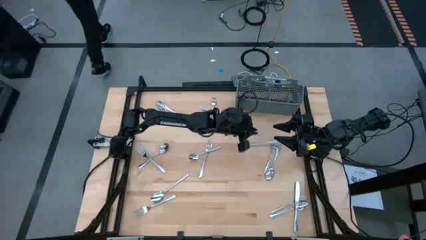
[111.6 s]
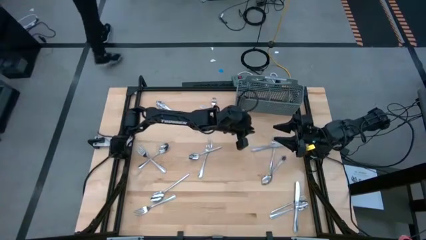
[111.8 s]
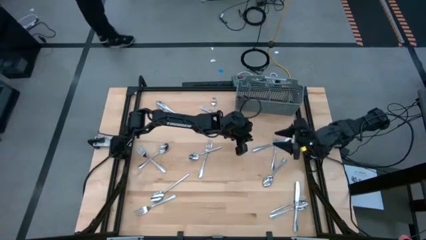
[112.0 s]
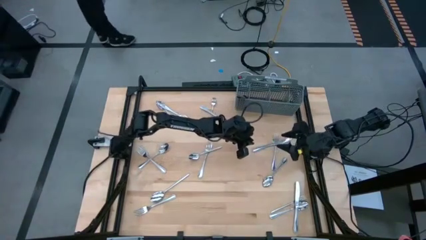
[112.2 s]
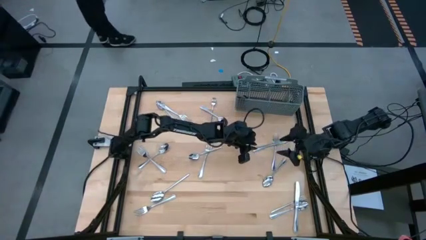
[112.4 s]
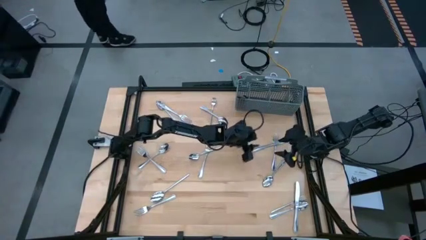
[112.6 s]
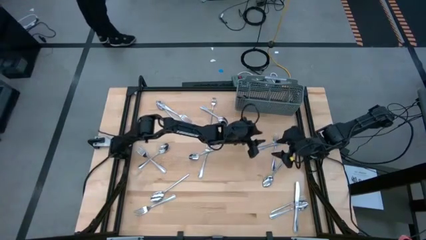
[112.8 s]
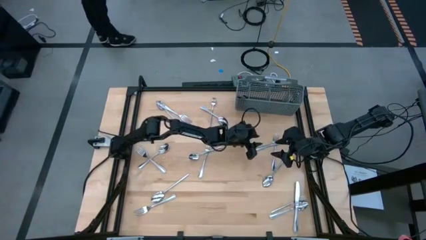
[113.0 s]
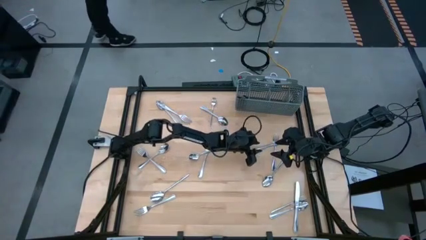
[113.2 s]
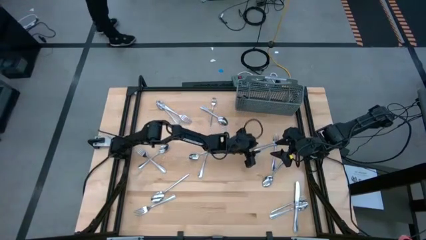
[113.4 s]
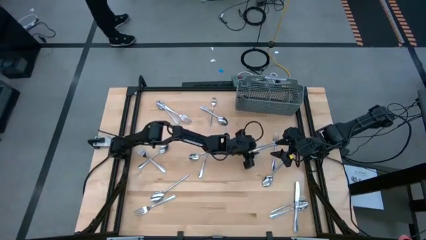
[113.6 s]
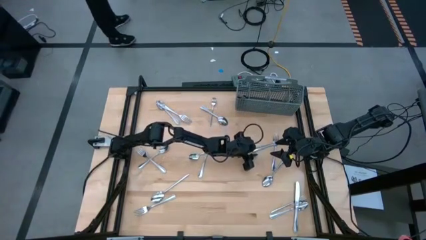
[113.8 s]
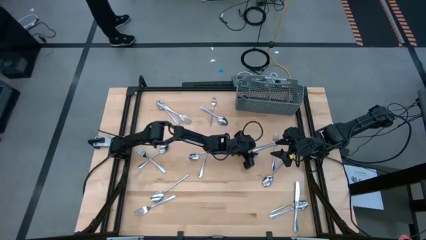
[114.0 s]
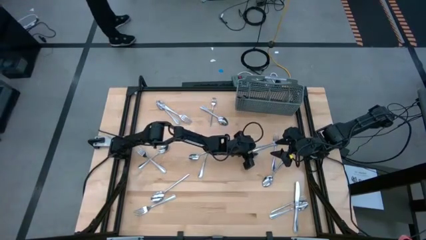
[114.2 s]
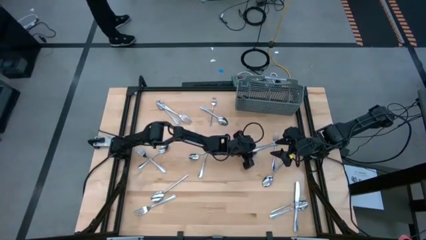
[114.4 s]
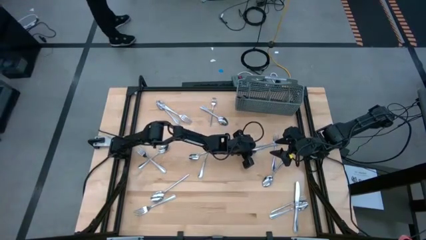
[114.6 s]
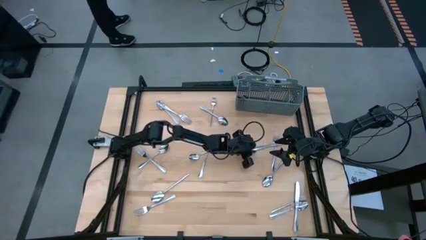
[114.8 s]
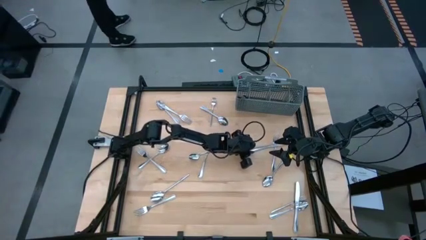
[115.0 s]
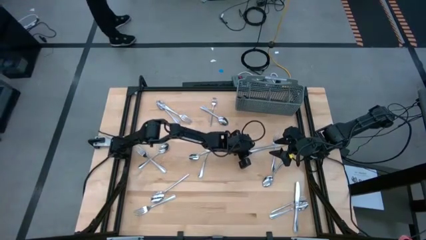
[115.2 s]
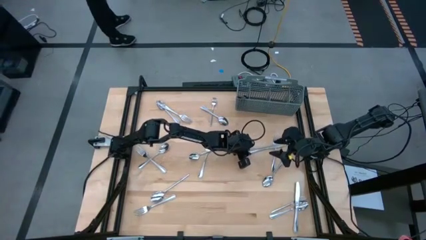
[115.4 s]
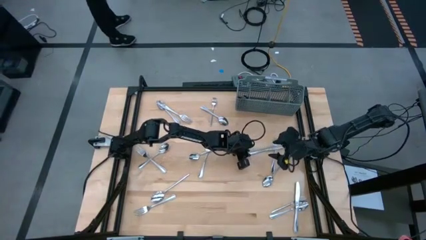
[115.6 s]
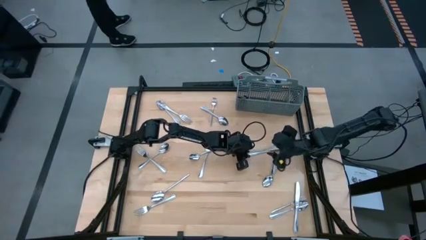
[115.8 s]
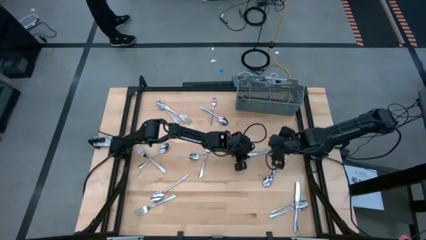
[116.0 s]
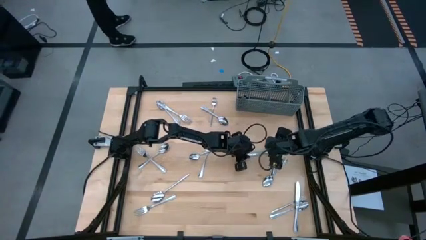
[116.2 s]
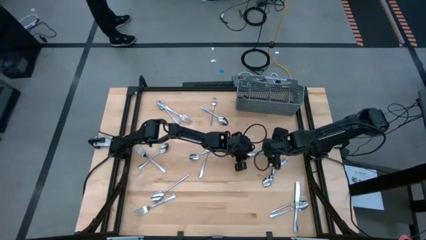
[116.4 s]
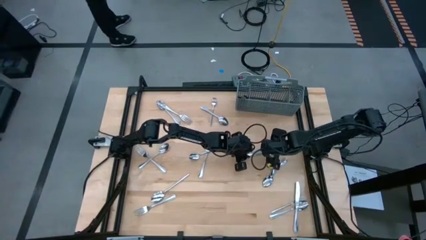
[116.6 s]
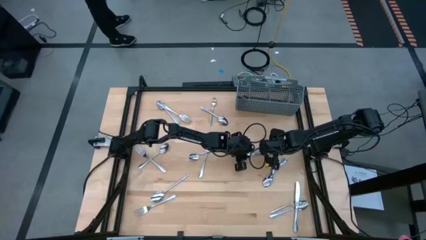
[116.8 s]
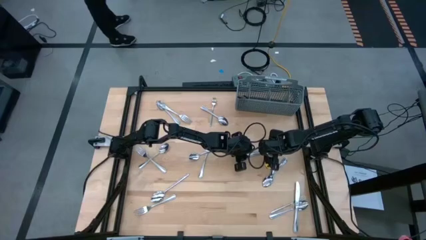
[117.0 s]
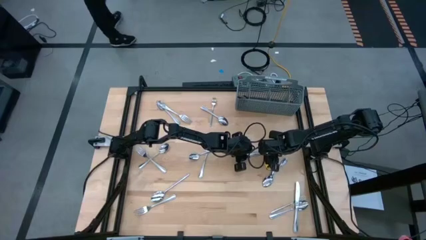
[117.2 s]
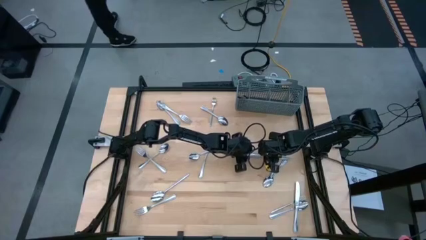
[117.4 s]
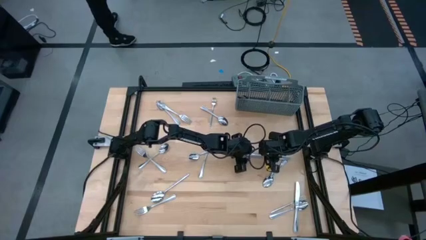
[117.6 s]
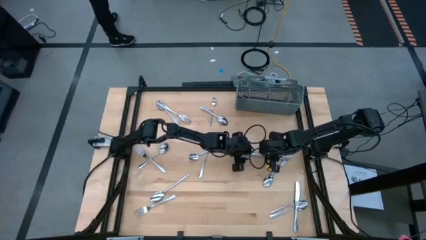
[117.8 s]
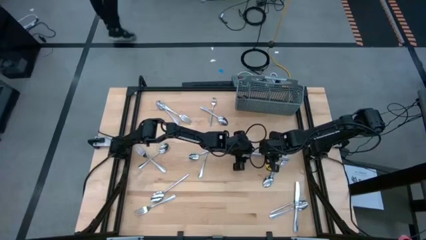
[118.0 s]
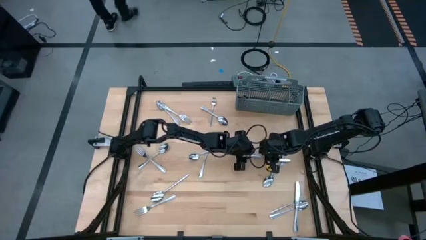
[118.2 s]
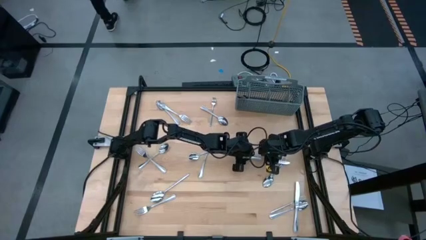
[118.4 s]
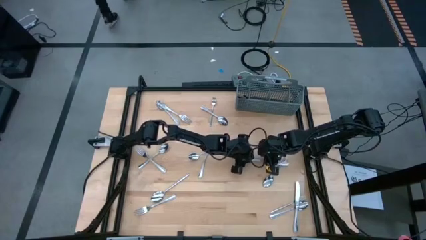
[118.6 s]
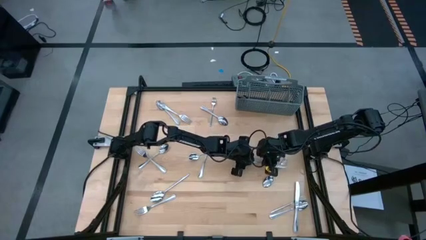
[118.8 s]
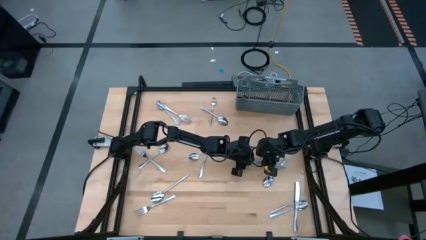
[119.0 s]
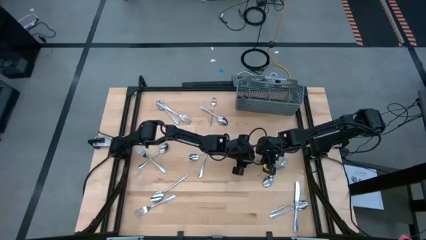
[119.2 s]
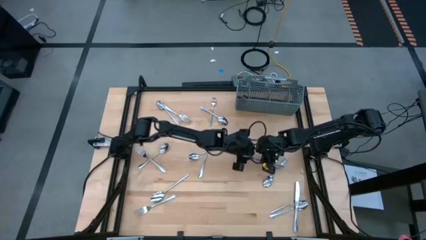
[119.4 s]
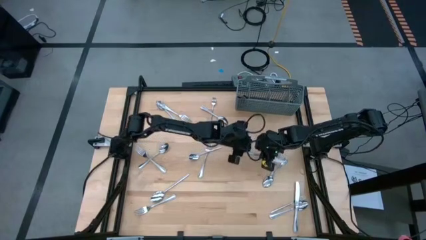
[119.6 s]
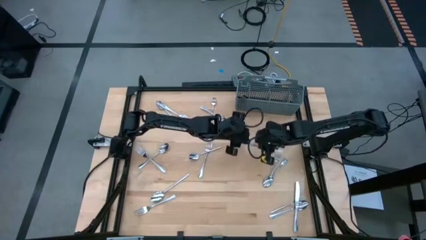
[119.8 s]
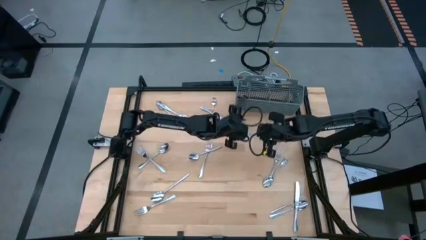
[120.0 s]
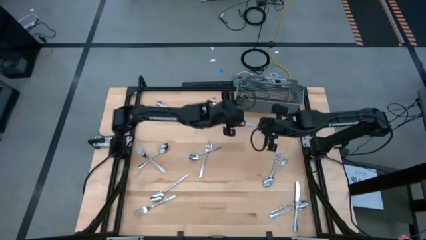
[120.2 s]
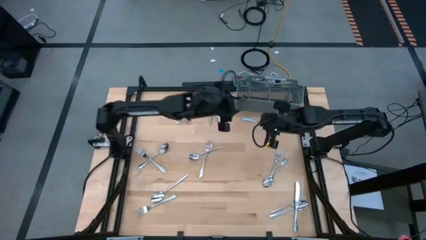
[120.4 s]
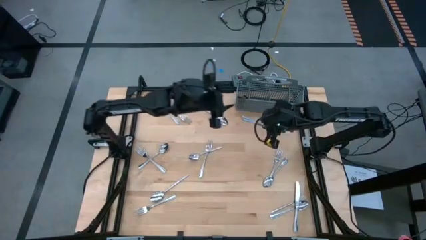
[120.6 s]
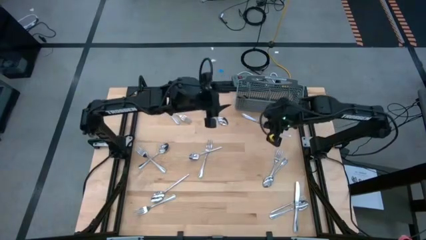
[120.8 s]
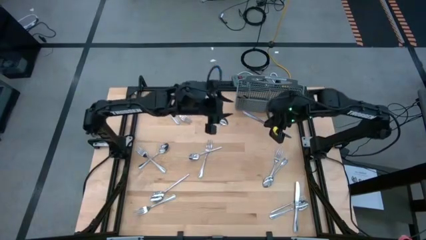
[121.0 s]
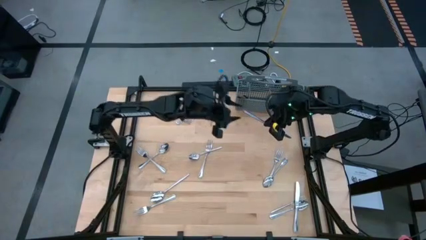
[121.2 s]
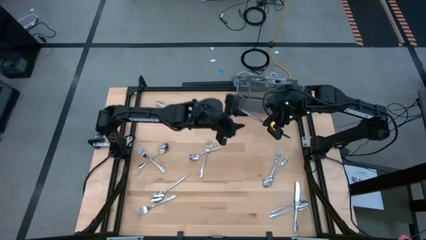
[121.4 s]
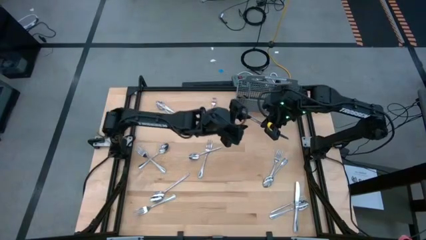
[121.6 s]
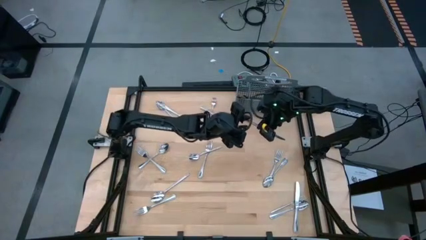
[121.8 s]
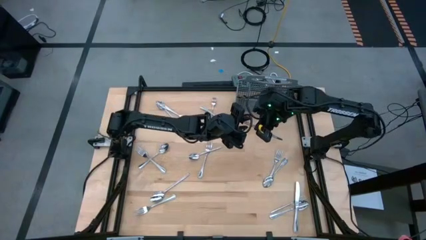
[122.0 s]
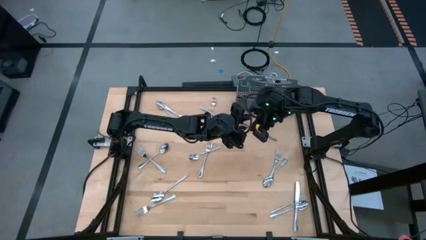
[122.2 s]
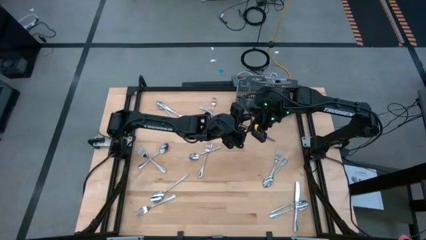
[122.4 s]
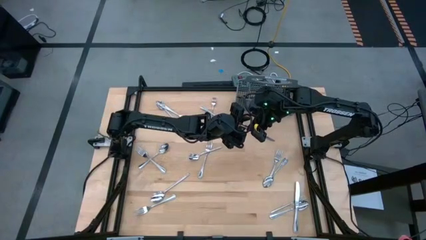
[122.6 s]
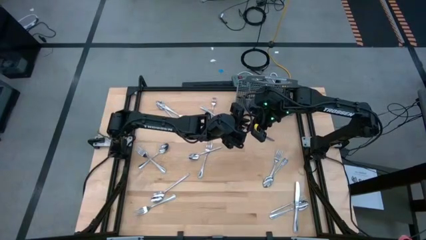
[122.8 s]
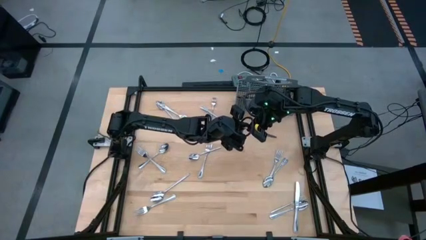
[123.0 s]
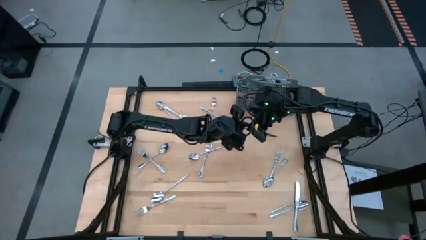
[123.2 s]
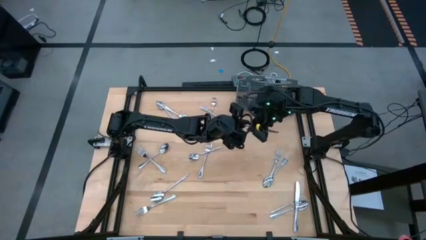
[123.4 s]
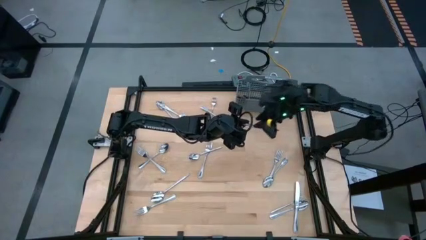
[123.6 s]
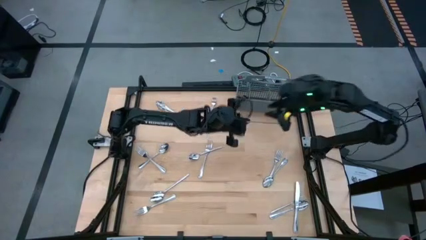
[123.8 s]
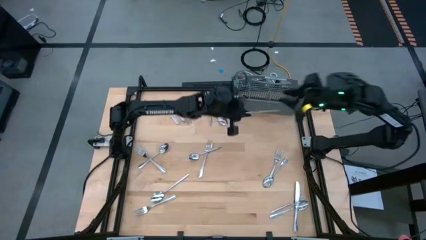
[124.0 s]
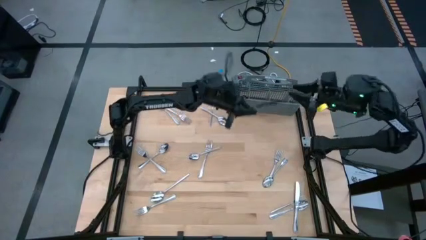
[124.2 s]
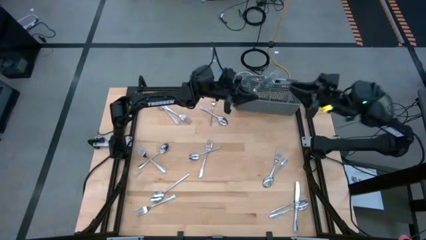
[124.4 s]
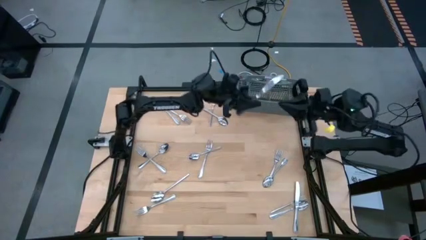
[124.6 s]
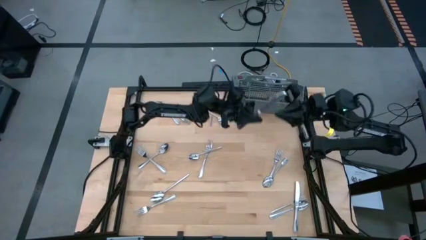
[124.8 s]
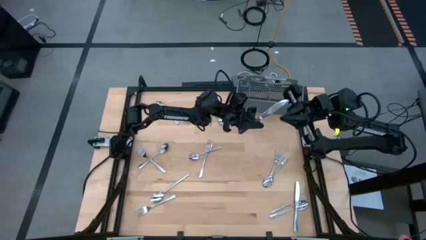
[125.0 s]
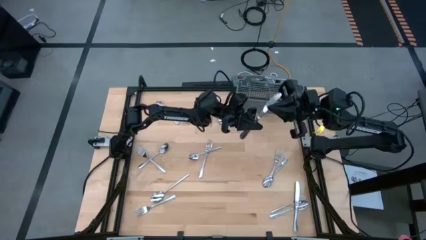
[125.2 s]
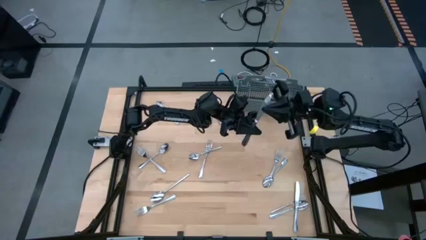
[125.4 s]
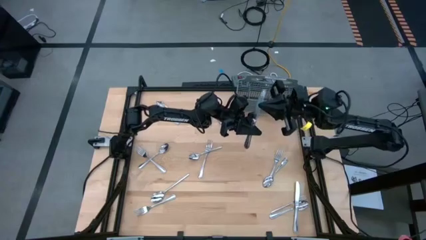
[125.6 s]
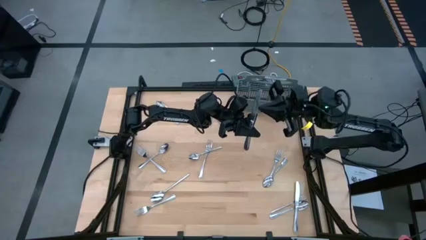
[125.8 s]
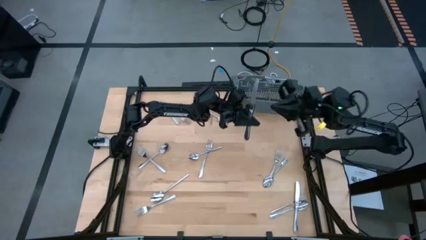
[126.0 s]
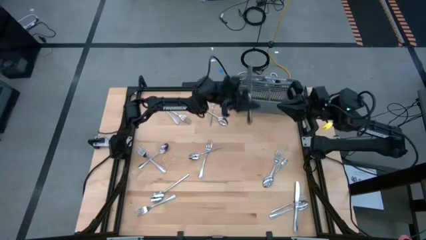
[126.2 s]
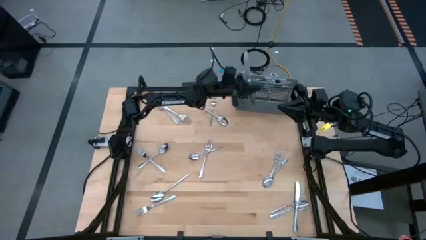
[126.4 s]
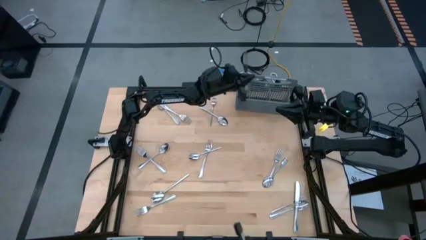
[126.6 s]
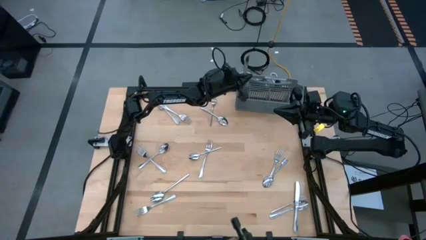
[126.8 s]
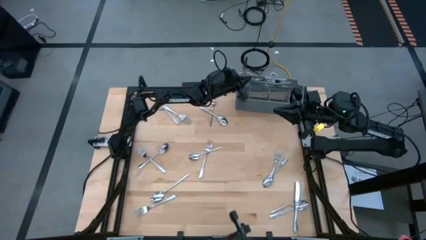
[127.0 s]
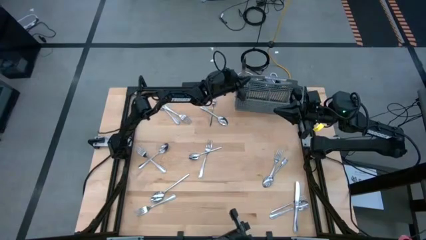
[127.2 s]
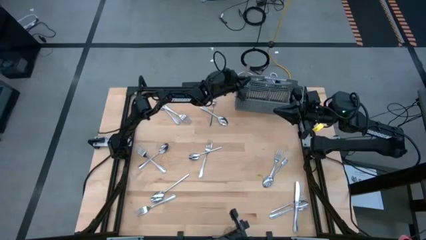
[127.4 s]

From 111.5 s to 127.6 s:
Task: Sort silverware
Put the silver knife into the silverware basket

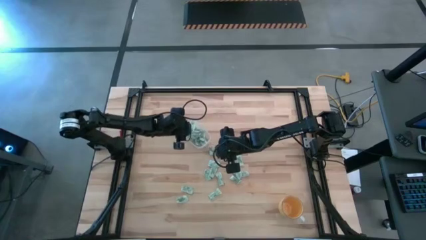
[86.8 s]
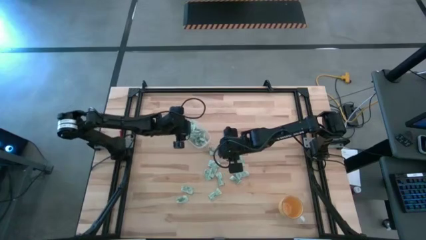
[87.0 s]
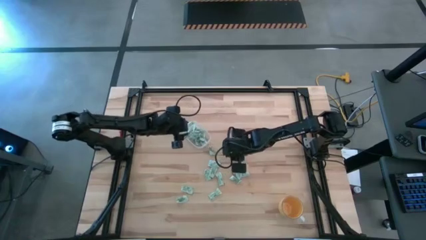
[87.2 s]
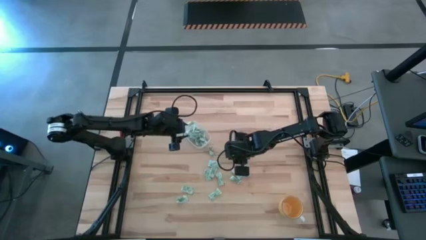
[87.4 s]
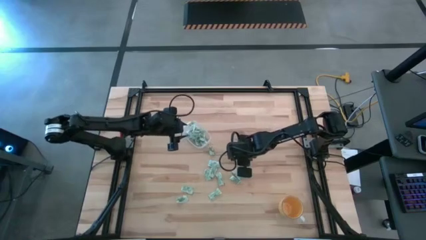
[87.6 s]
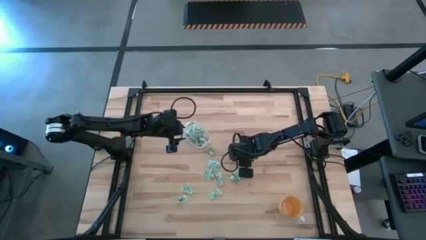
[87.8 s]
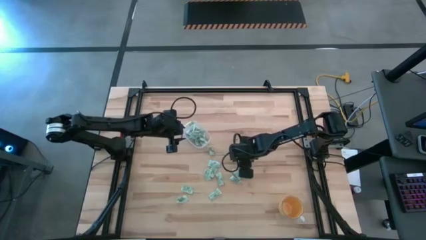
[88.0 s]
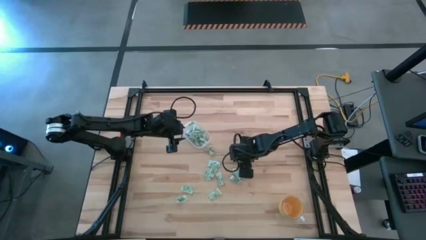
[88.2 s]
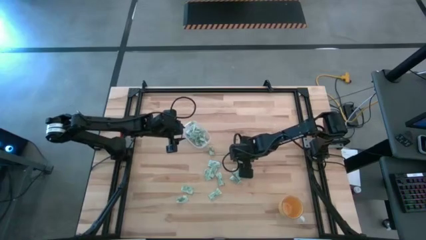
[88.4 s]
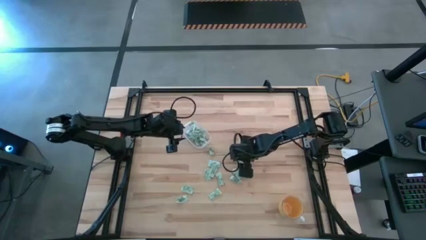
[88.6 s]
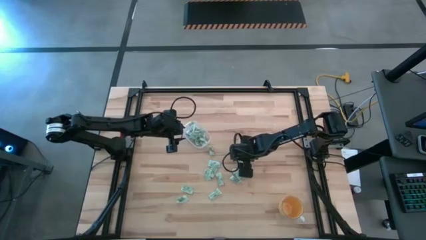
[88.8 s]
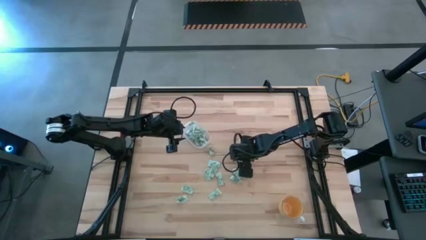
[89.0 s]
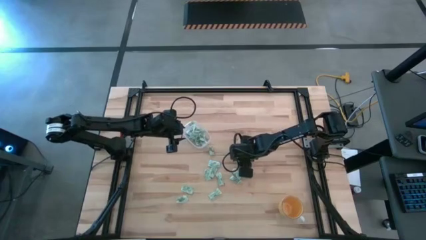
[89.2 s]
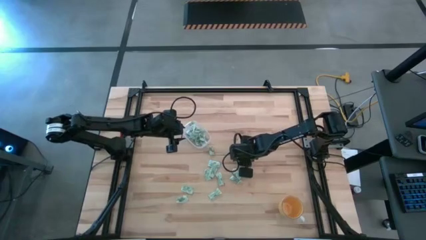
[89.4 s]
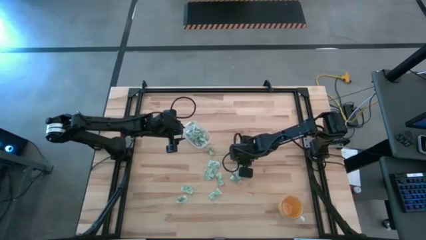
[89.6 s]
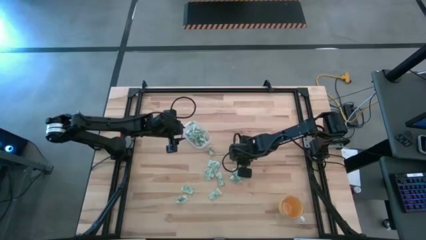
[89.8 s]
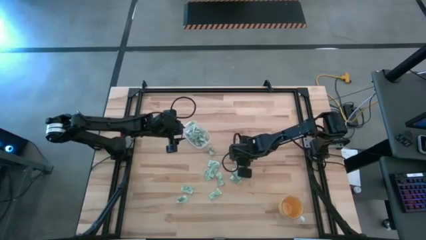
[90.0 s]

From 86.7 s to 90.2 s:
Task: Pick and place Stevia / Truvia into bins
Put the stevia packet into the transparent bin
